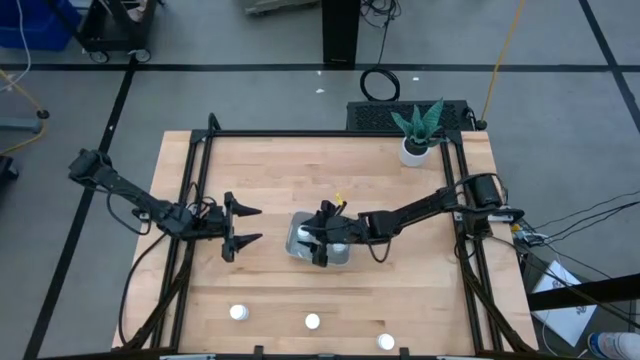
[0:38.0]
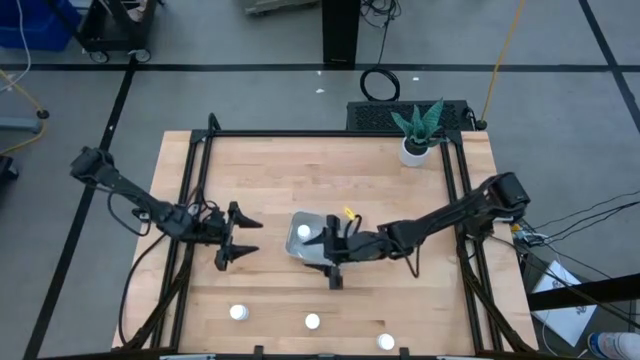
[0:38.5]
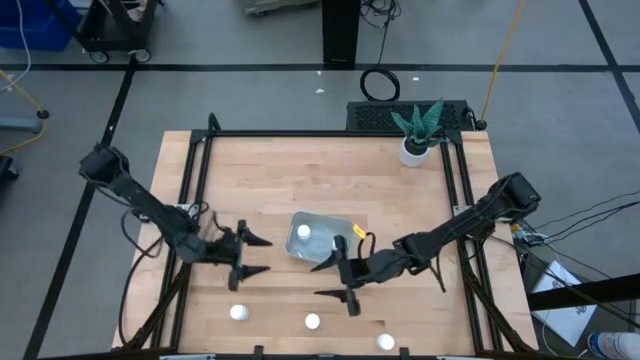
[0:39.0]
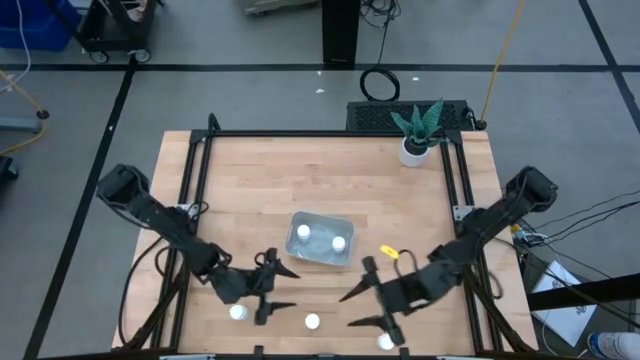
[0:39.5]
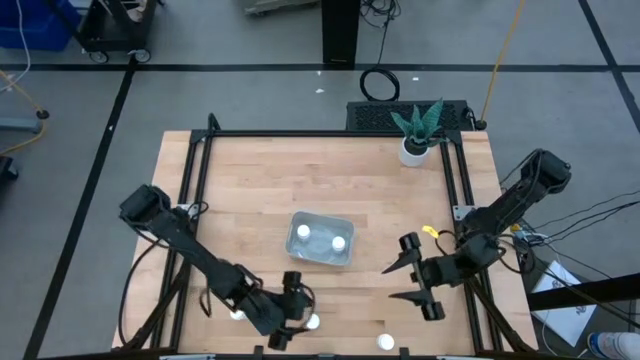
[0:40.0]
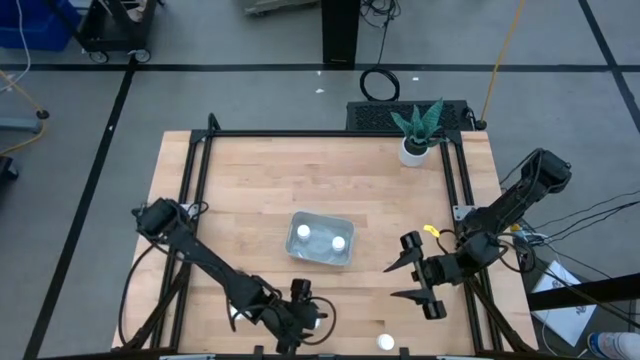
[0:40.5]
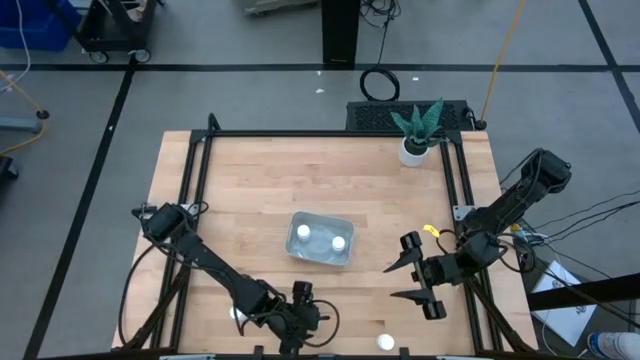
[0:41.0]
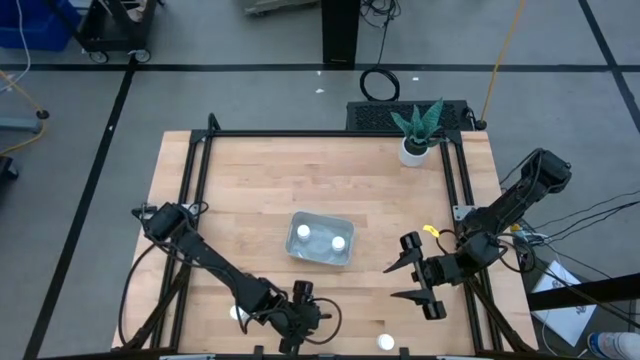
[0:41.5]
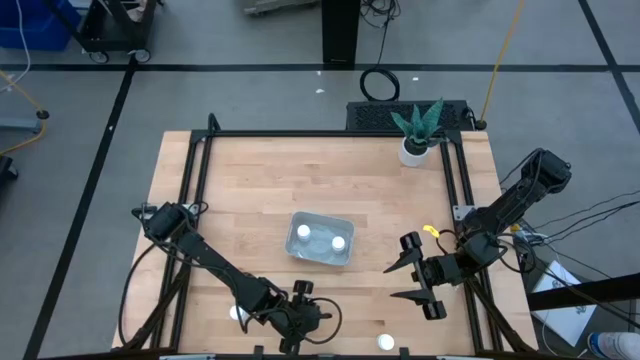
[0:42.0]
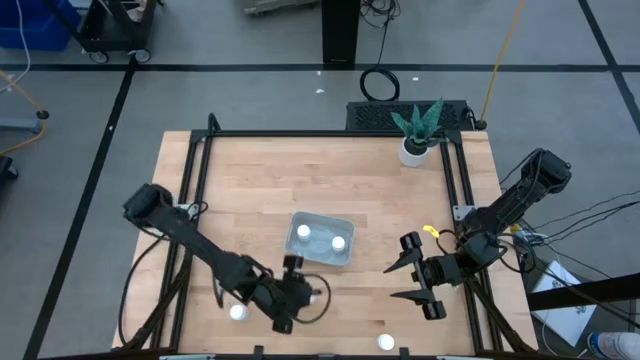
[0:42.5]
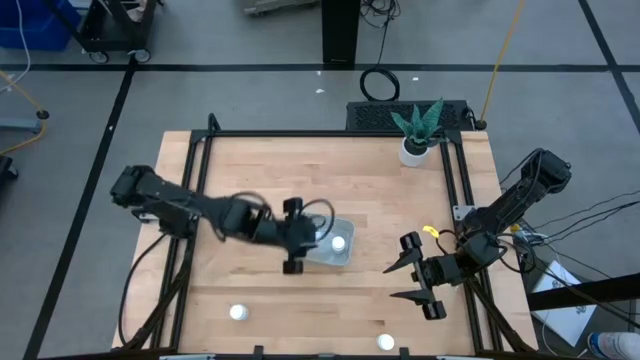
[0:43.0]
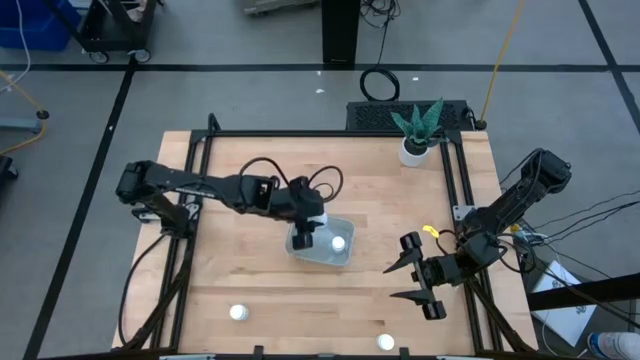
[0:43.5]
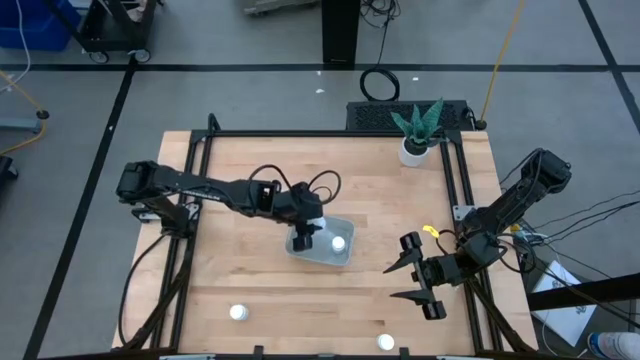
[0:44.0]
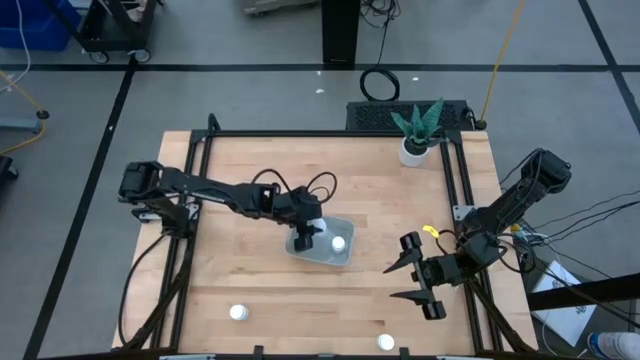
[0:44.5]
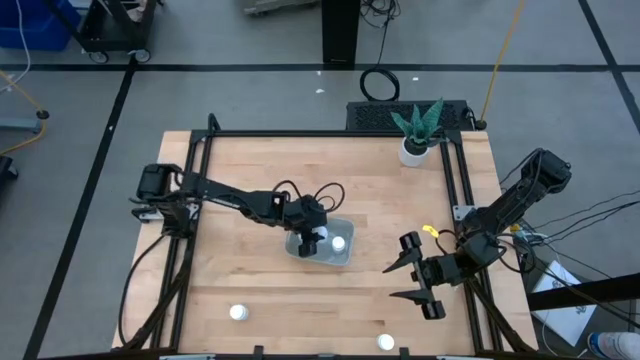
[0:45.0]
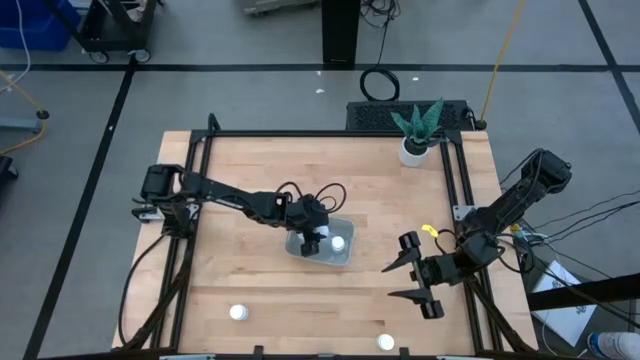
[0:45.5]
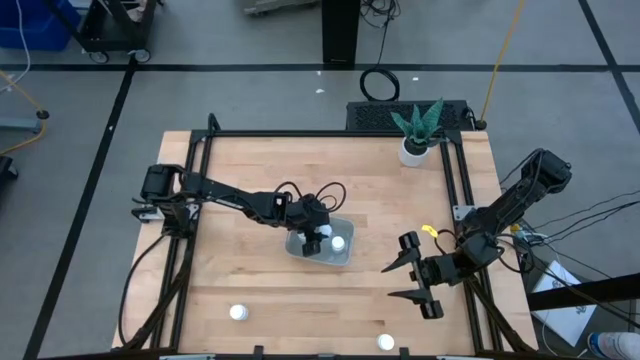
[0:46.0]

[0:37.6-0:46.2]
Task: Pick and place pill bottles into a basket
Put the middle pill bottle into the bin

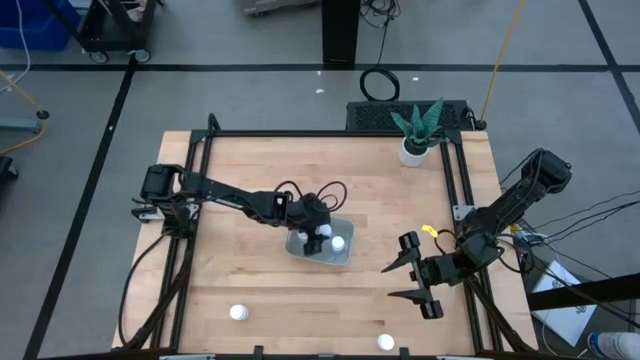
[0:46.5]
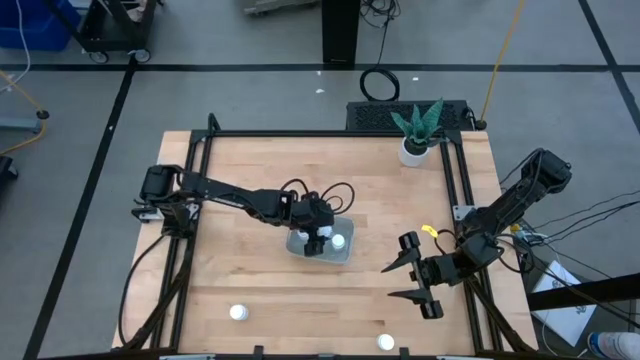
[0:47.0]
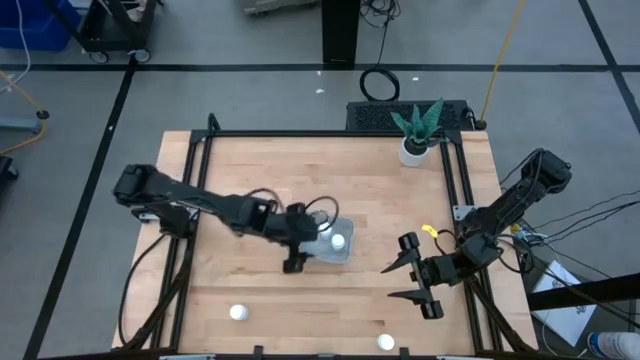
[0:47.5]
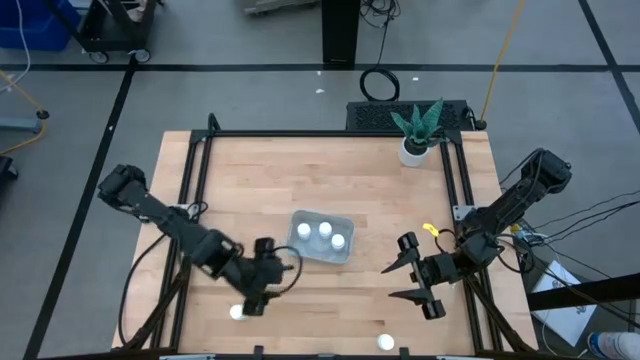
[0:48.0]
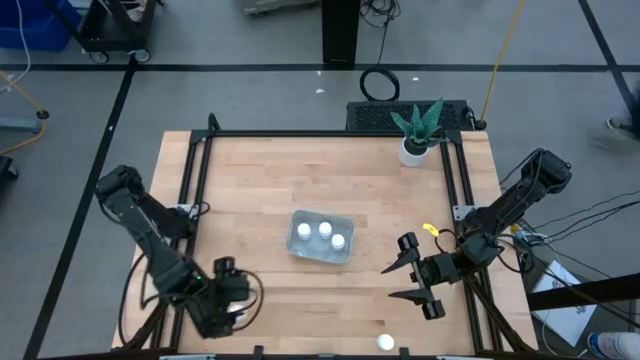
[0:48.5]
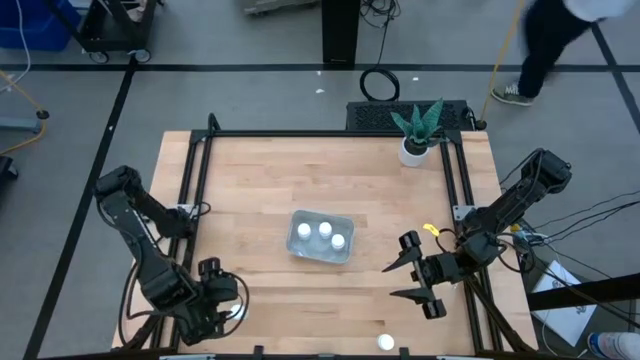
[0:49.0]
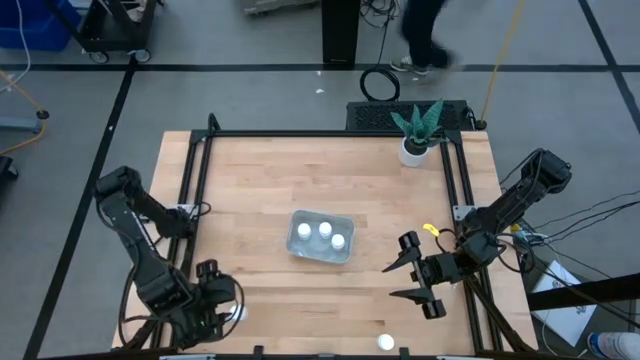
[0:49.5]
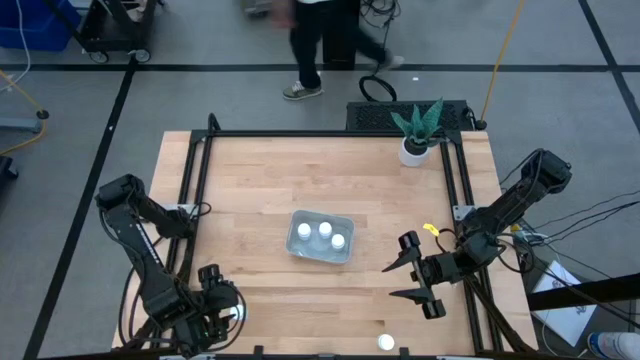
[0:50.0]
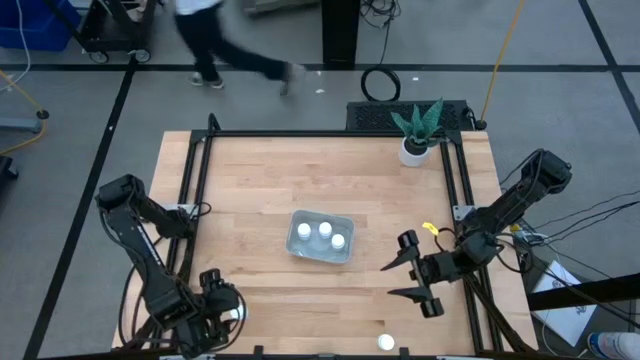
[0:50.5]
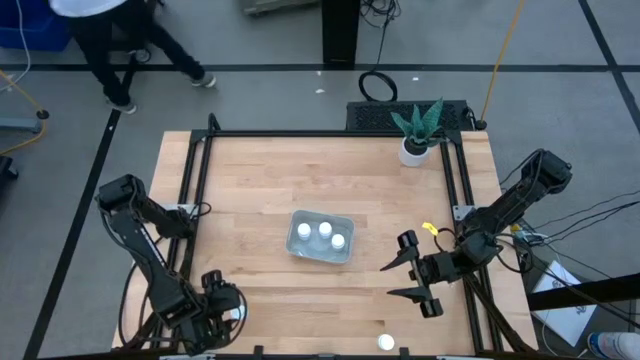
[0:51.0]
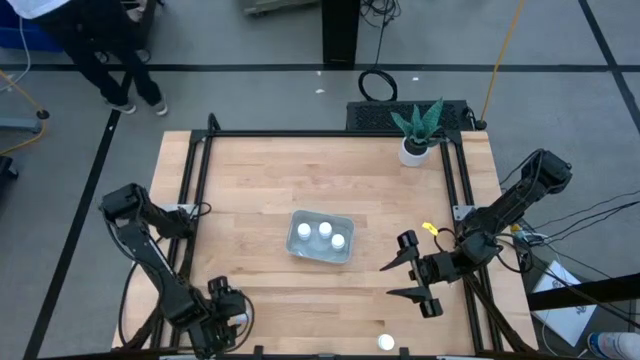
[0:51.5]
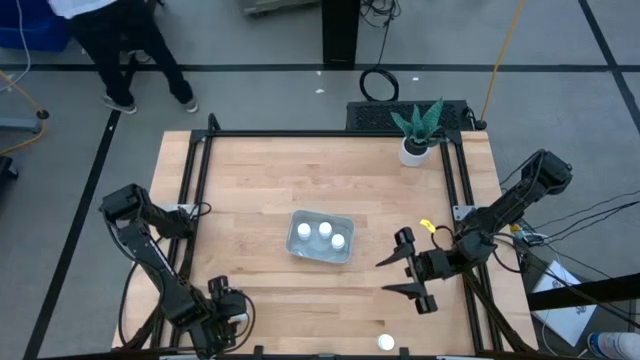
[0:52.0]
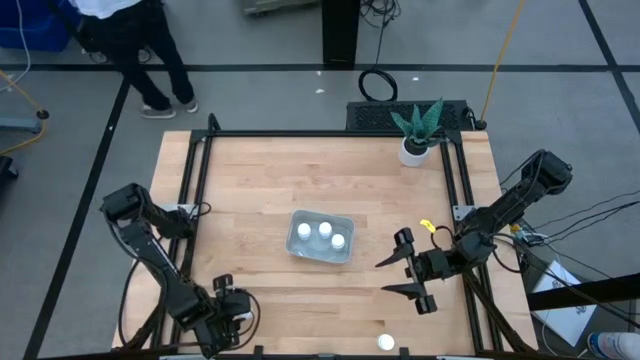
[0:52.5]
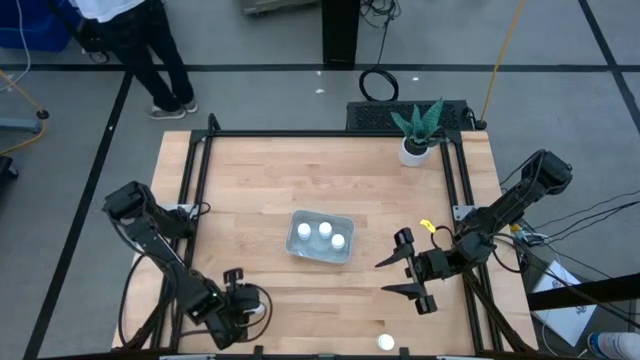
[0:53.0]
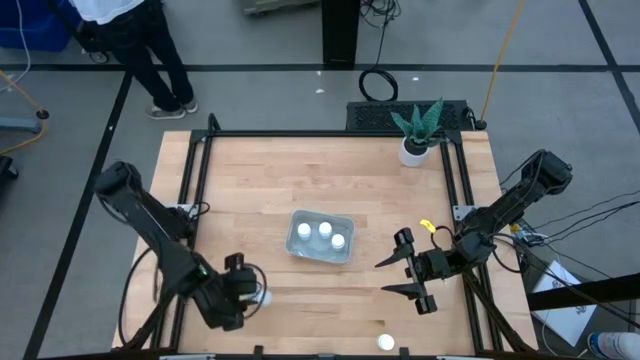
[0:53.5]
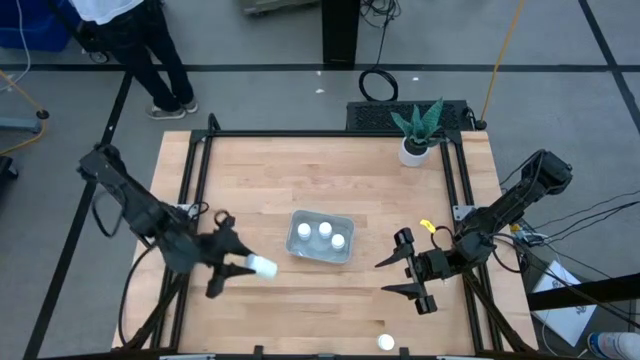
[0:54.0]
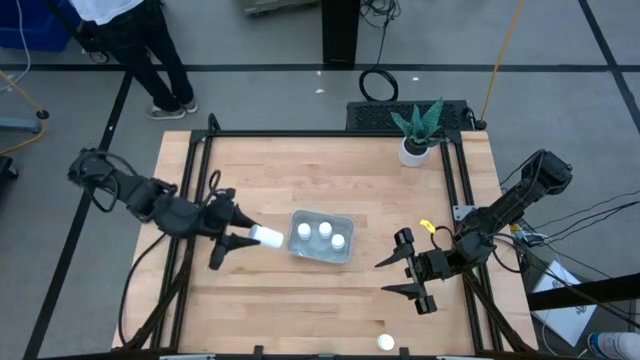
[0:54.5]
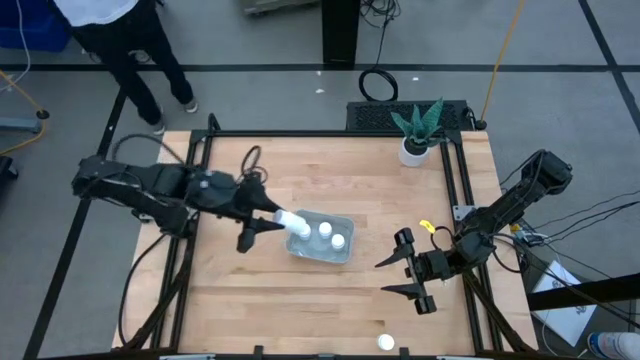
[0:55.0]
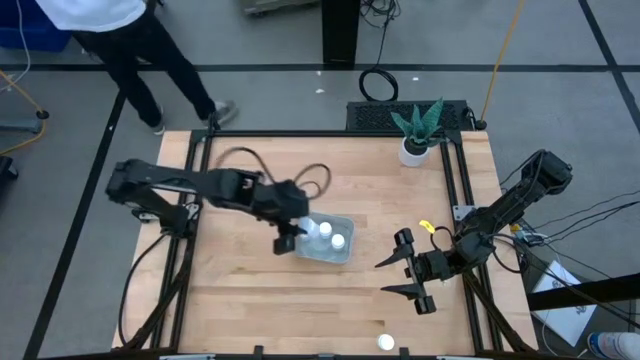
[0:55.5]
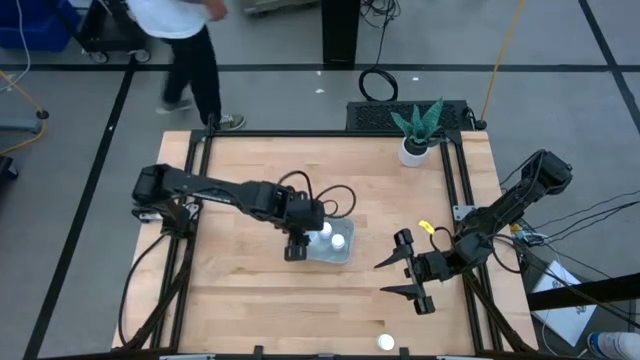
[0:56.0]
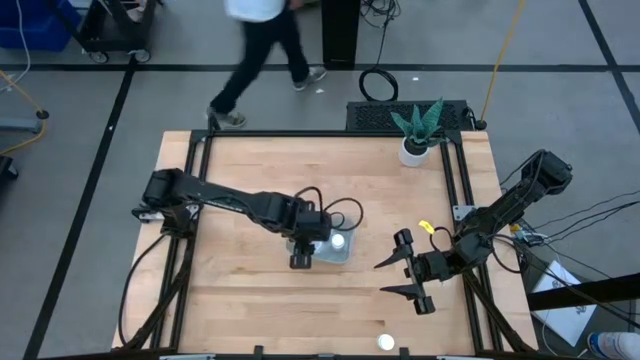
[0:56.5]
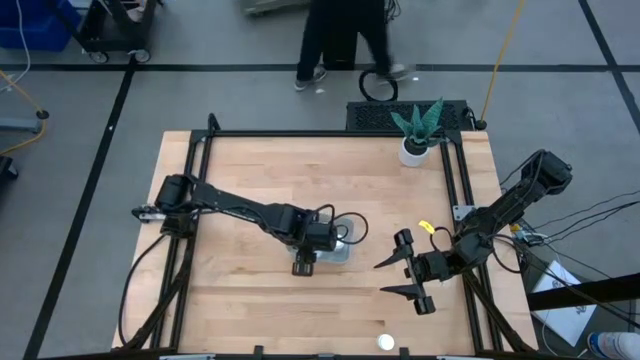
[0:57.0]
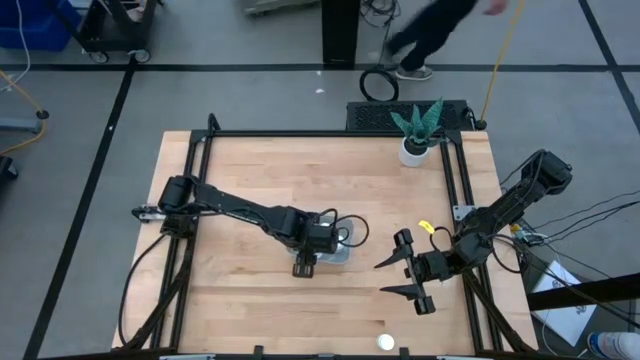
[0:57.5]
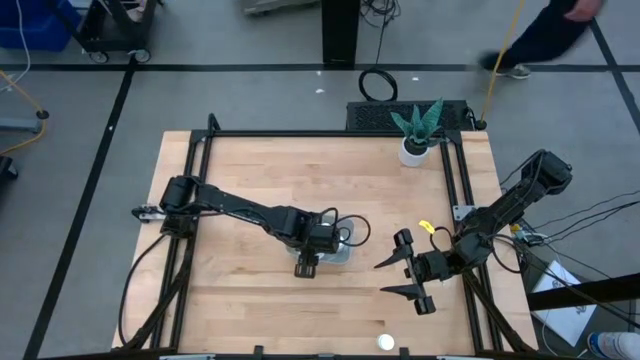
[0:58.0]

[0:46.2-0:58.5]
Put the left pill bottle into the bin

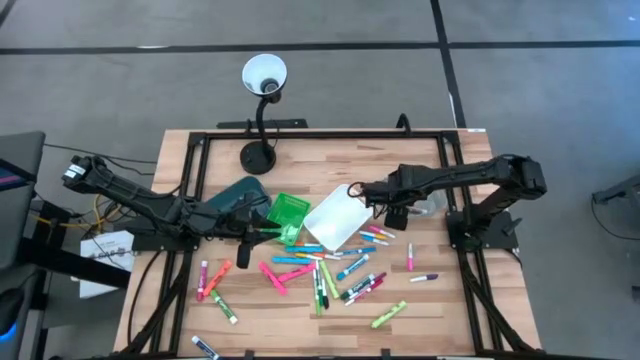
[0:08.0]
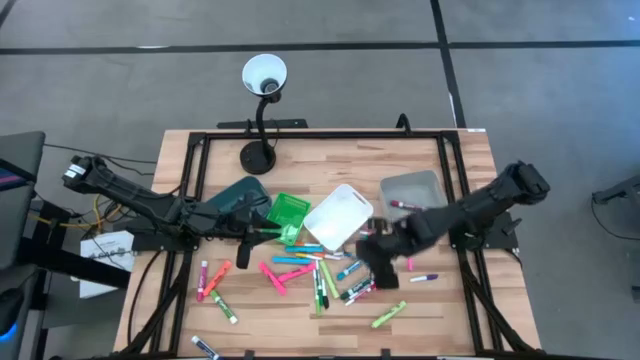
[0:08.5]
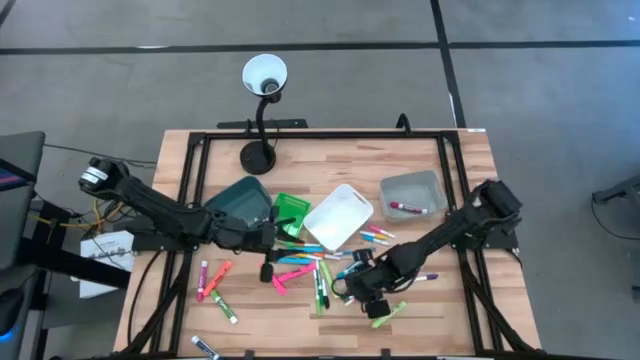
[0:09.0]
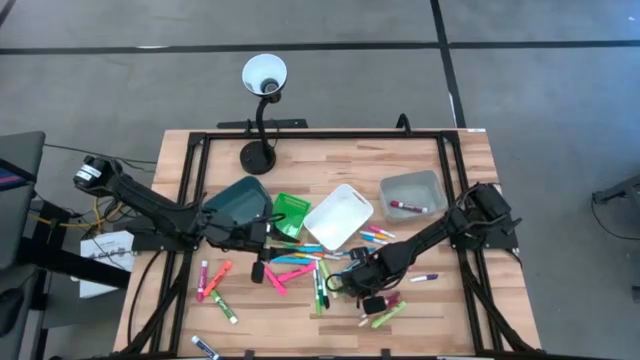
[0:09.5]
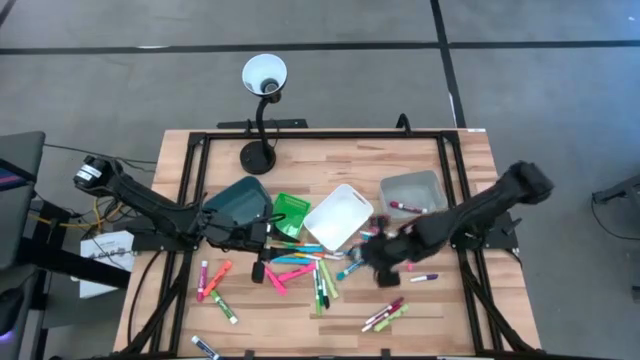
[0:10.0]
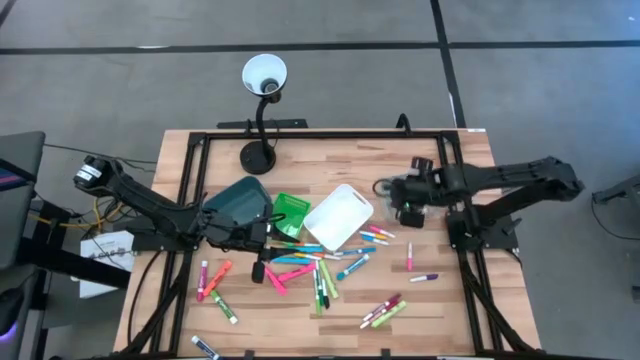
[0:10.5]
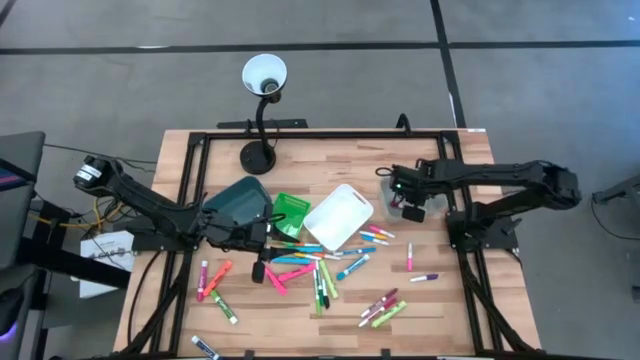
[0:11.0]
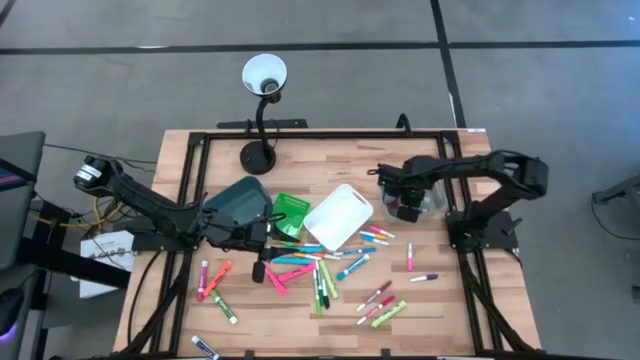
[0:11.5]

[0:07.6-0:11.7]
Task: Pick & Place Markers
Put the dark green marker pen into the gray bin
